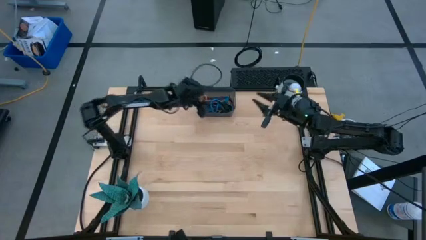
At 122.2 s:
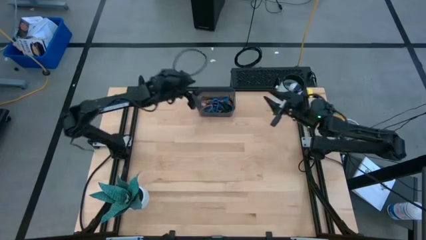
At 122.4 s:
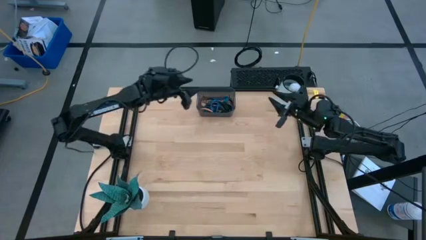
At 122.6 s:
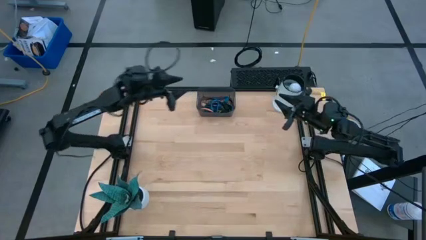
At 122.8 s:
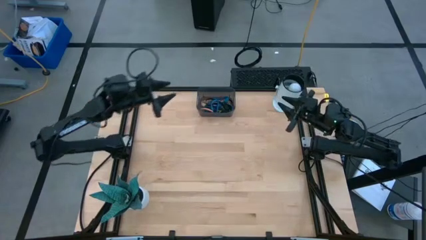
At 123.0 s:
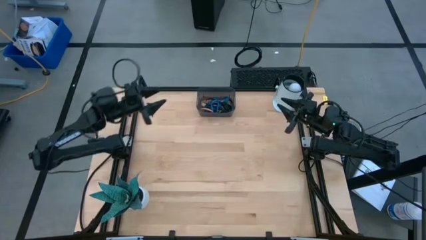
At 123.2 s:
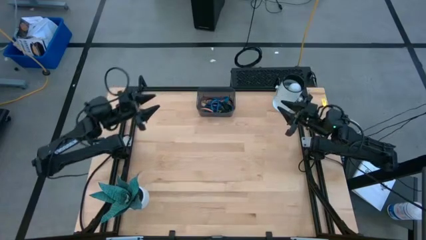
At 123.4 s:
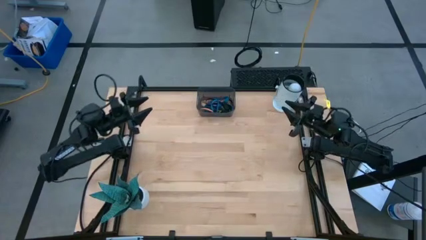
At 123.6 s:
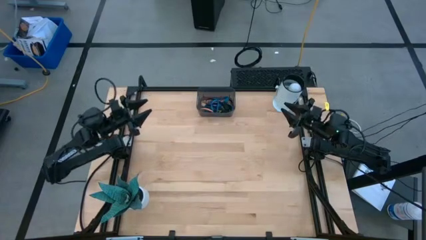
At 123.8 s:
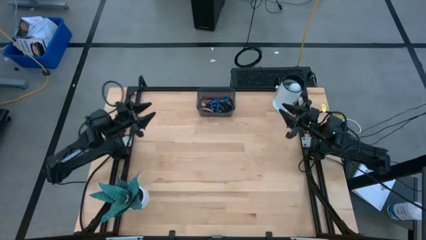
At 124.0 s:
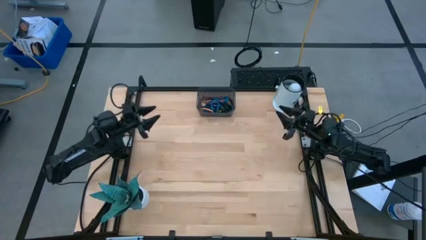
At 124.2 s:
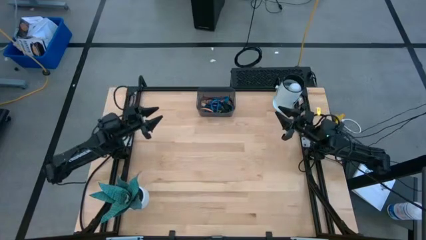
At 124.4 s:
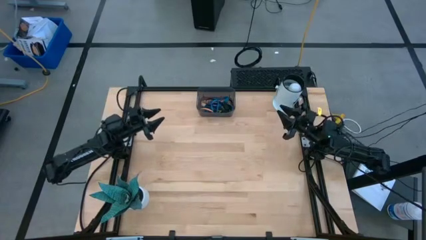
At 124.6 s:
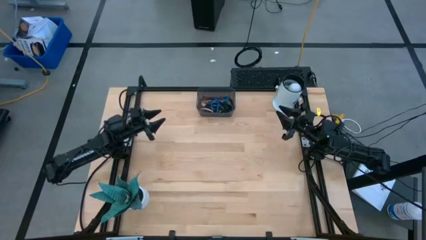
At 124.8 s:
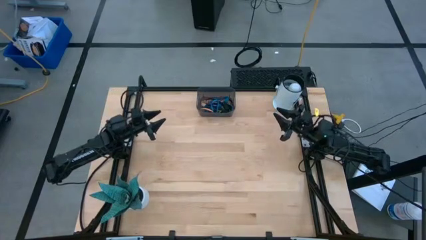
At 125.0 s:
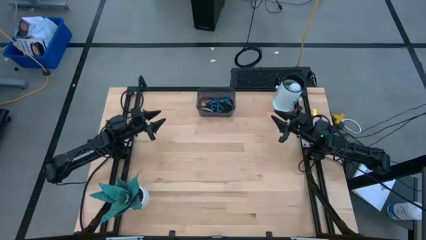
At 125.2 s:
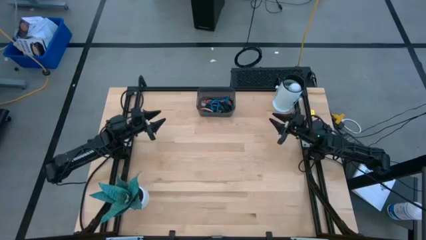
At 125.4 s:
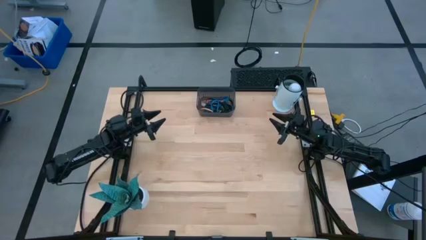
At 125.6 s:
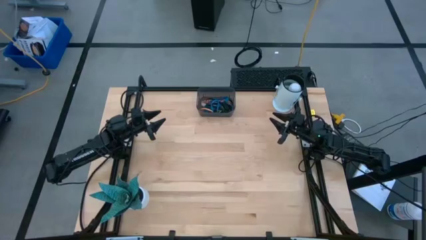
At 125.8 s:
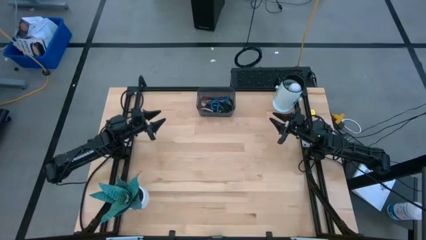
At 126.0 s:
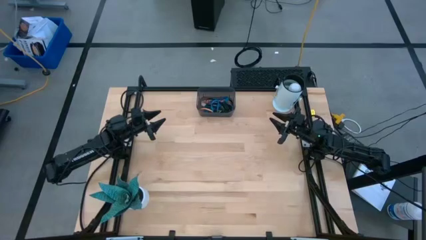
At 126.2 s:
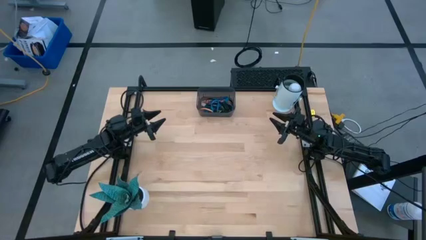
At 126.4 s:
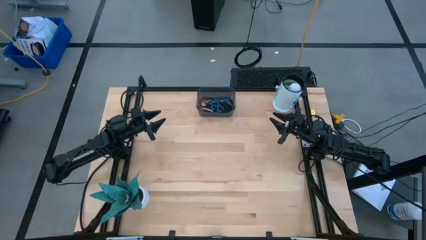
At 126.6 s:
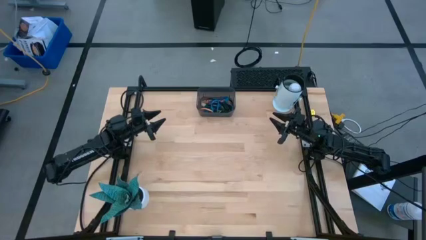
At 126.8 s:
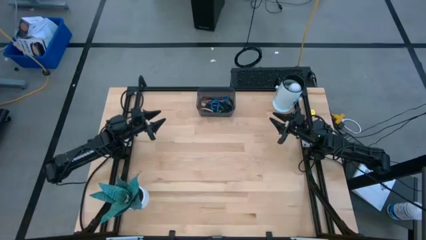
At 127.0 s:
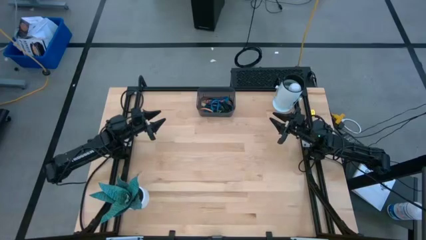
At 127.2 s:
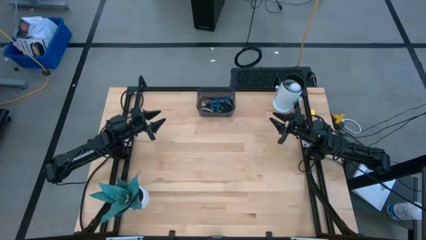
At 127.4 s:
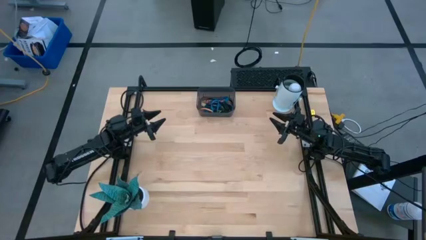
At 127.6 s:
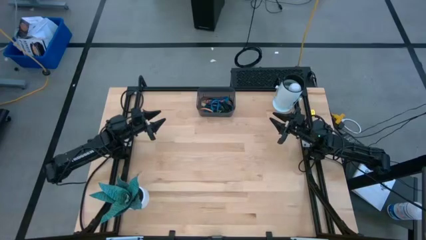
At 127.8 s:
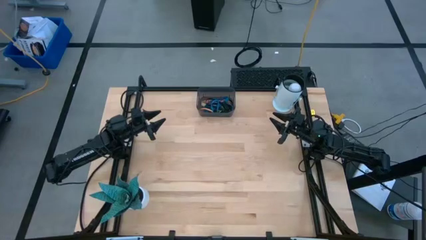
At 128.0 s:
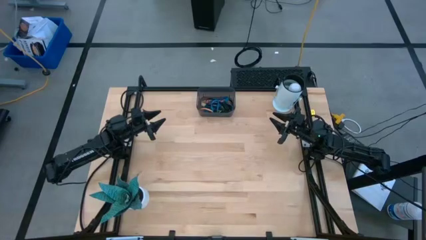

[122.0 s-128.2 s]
Task: Pick and place rubber bands into bin
Return to Home Position

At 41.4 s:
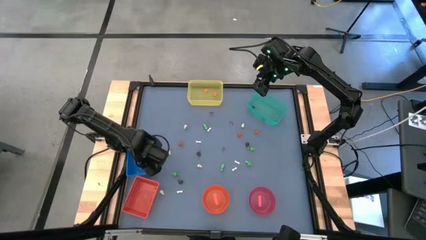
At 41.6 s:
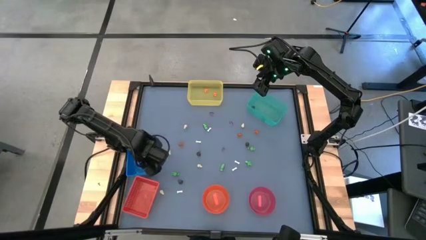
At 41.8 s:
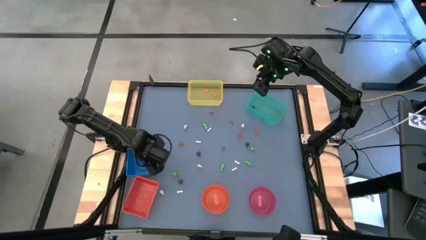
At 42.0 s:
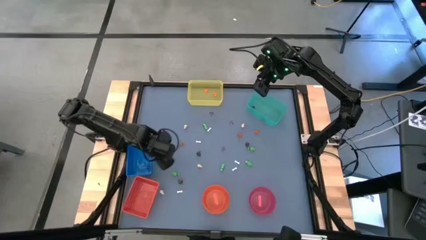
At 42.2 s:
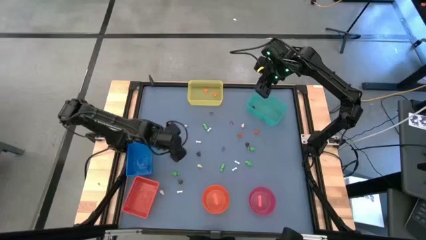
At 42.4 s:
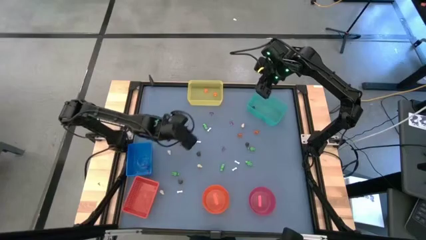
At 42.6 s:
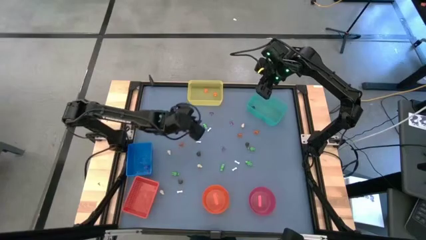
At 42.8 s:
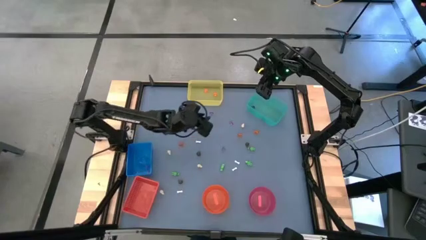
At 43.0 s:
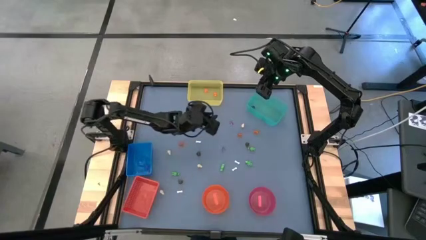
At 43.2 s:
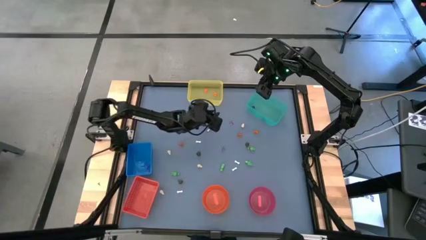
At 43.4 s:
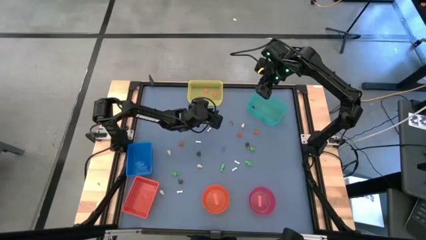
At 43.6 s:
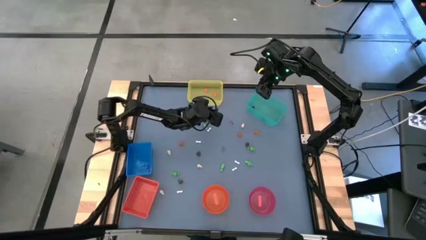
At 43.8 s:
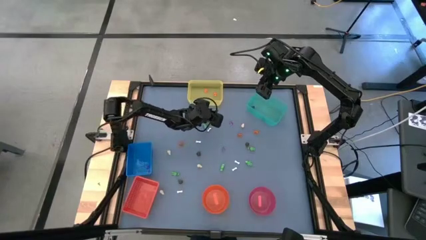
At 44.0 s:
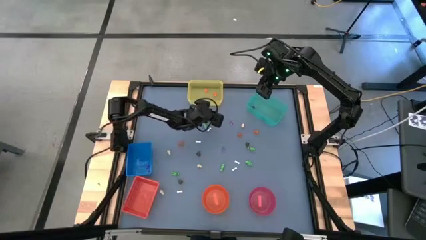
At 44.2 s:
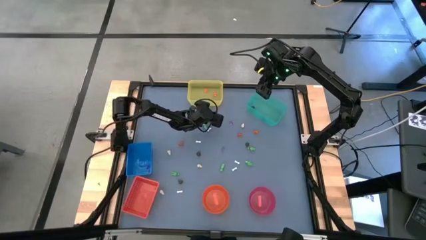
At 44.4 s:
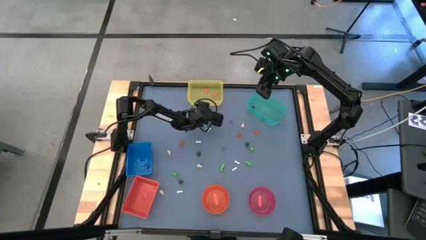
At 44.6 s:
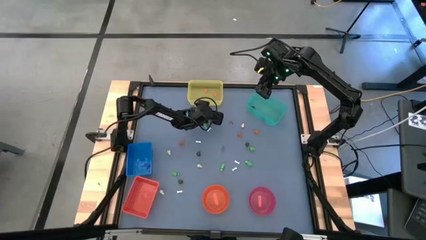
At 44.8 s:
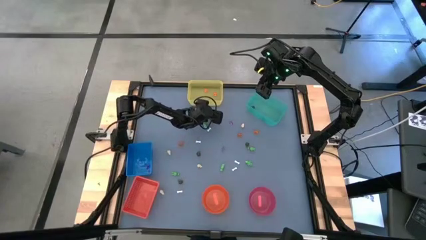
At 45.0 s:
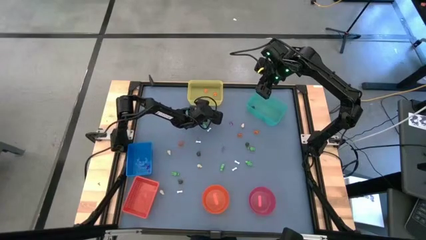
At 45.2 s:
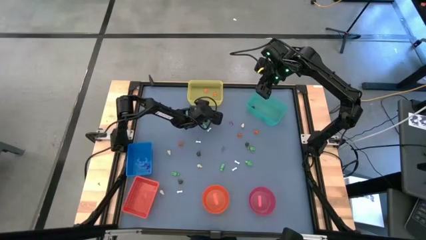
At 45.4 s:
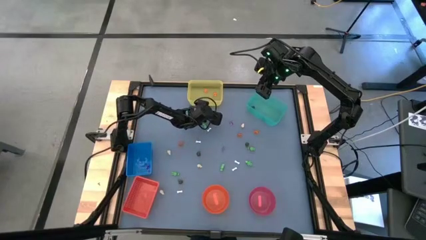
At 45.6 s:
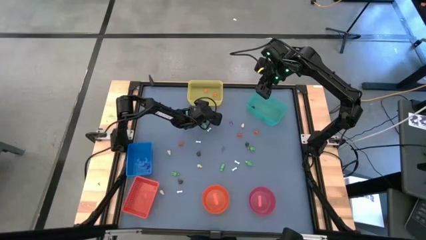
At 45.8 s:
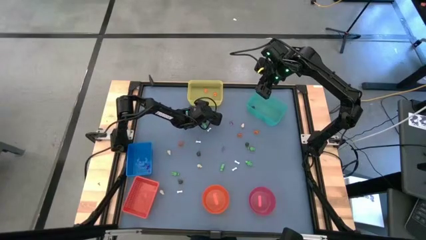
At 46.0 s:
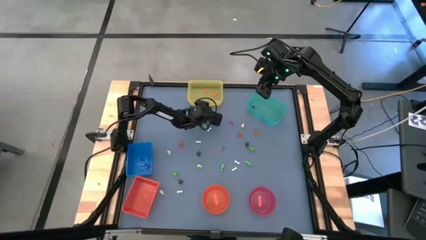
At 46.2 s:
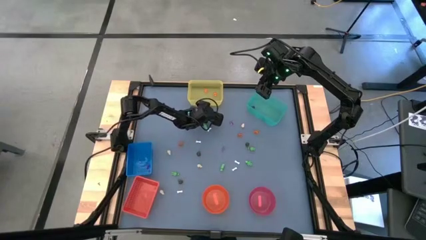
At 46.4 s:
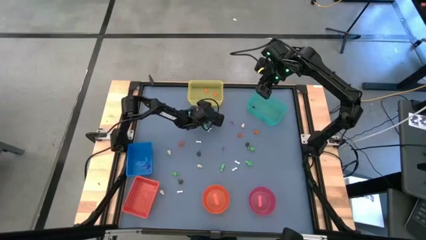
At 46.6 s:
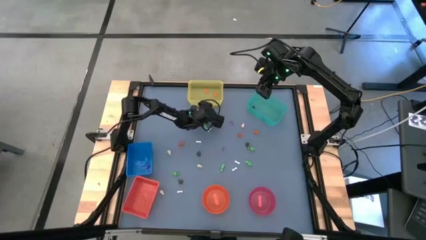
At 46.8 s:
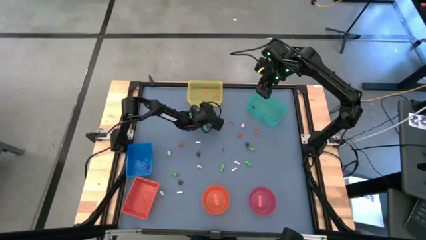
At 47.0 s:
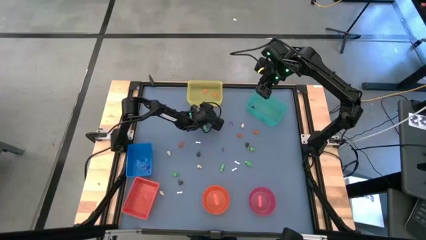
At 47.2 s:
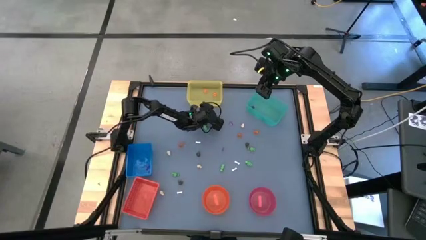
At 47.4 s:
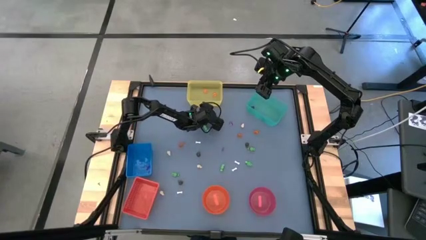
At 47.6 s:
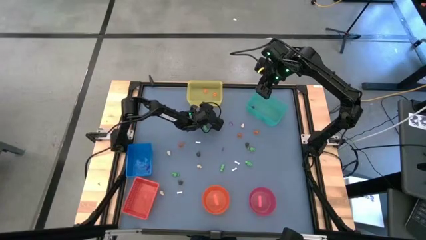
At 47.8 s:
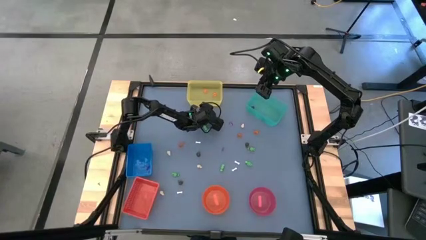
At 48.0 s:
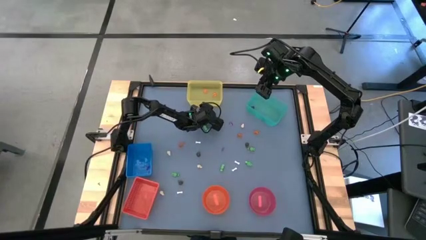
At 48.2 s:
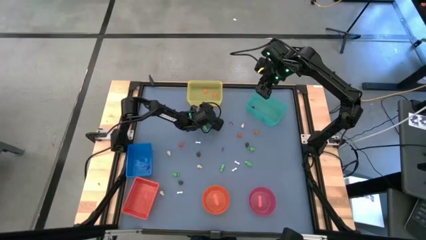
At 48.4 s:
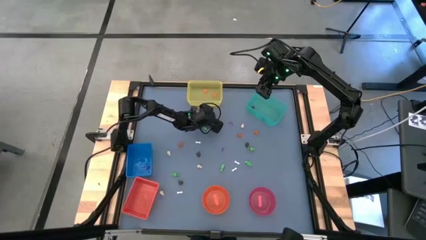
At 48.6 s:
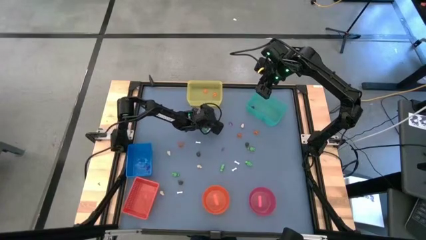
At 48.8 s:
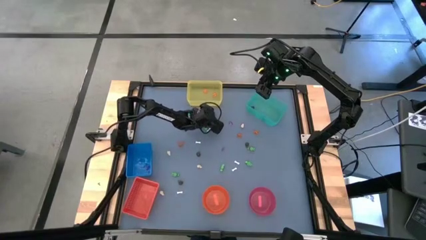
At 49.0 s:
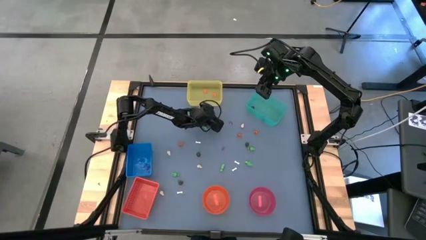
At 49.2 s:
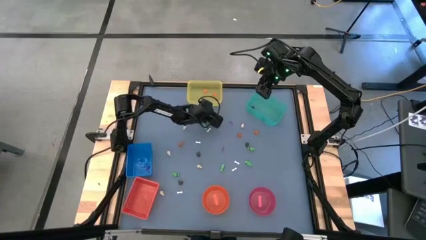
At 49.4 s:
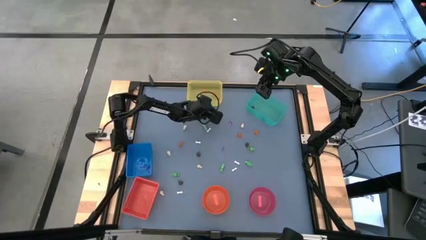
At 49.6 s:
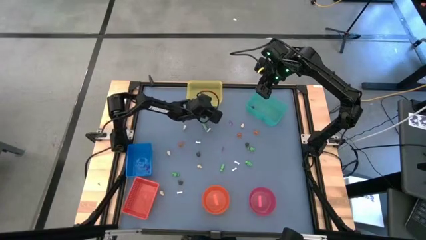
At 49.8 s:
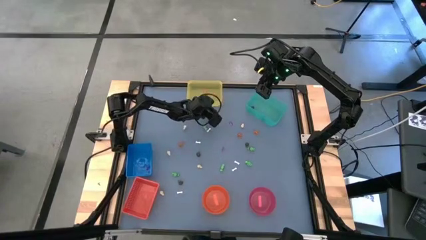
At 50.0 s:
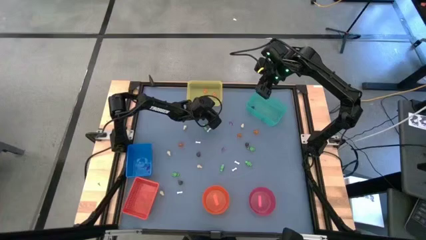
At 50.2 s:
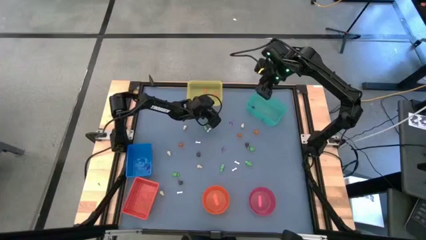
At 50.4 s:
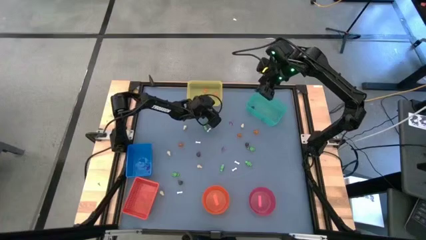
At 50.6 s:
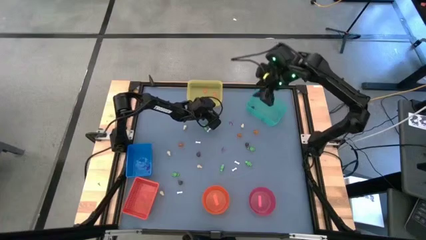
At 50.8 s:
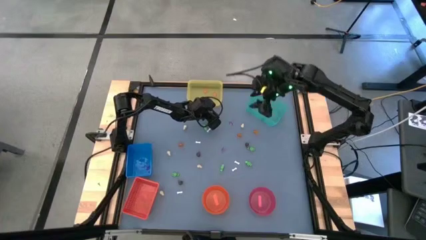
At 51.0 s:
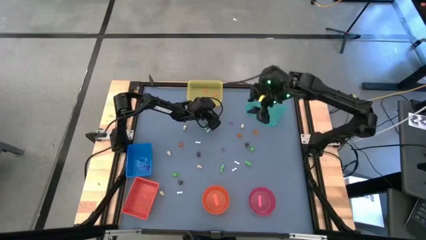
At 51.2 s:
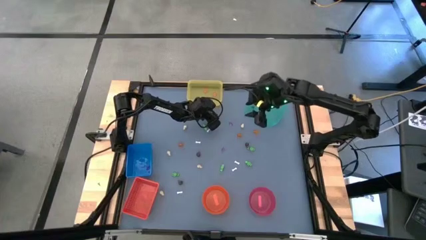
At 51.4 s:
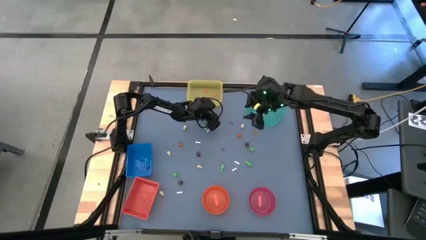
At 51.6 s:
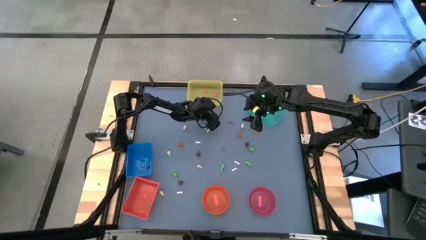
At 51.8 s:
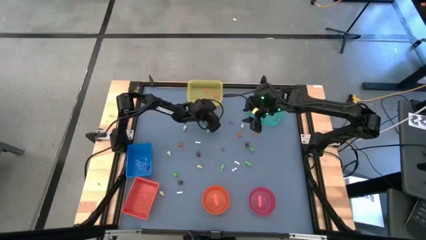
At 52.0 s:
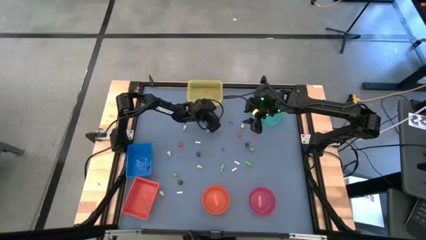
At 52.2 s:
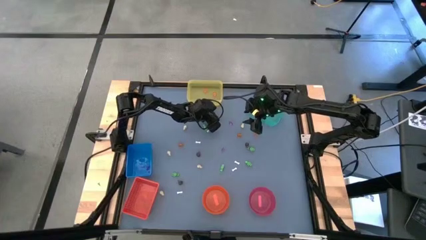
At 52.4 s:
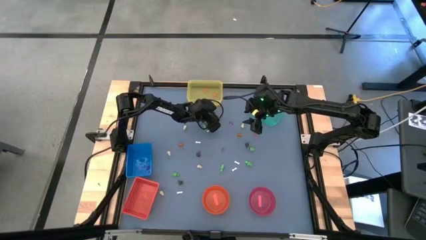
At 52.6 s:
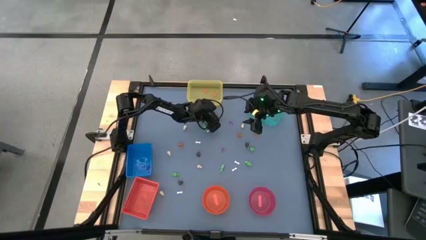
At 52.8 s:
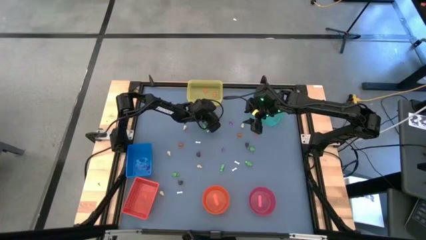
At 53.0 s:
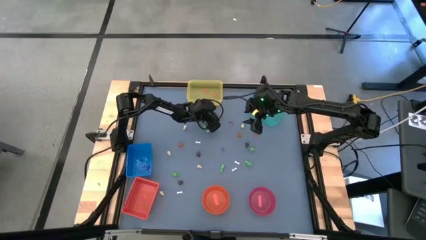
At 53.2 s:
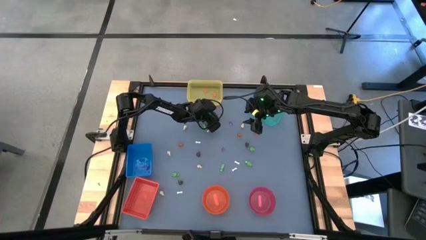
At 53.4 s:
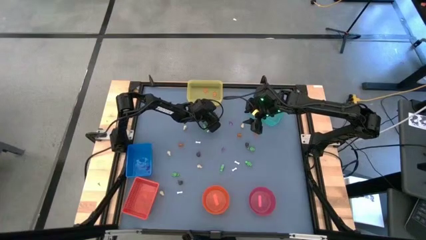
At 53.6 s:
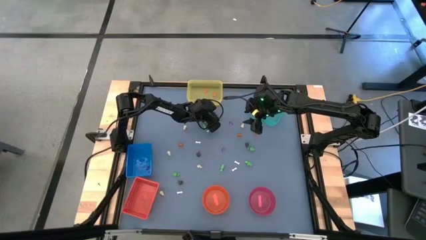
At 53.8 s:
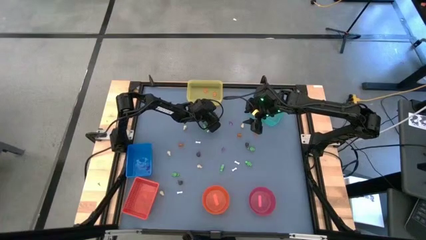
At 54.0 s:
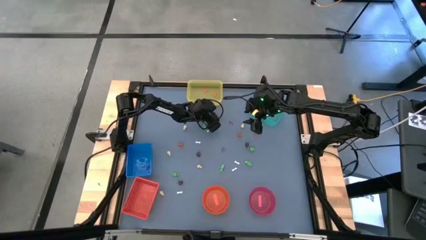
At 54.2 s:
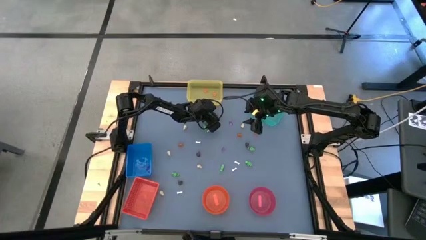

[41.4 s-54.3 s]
Task: Sort Halloween decoration
Put the purple witch hat toy into the blue bin
